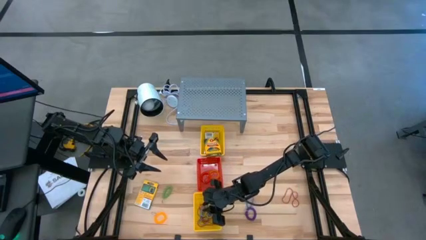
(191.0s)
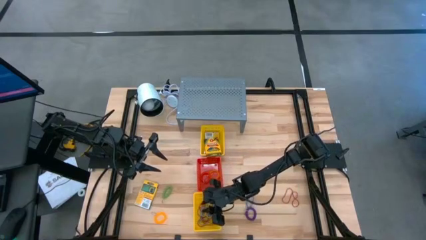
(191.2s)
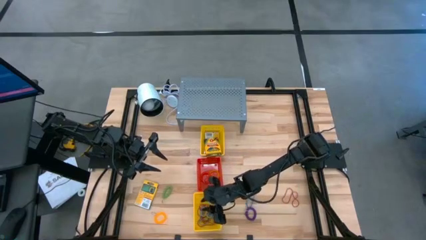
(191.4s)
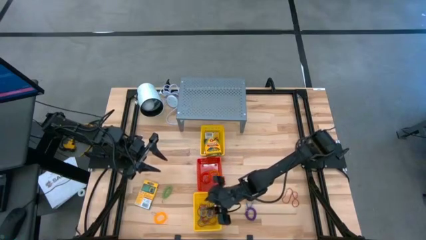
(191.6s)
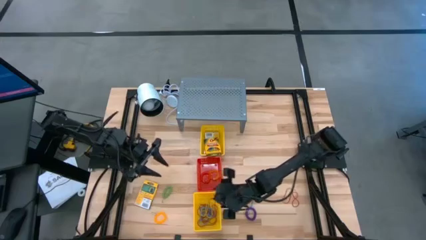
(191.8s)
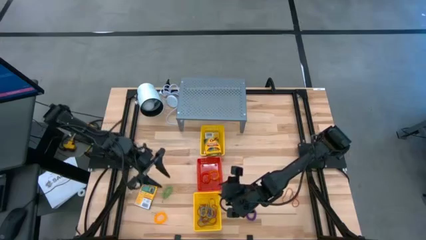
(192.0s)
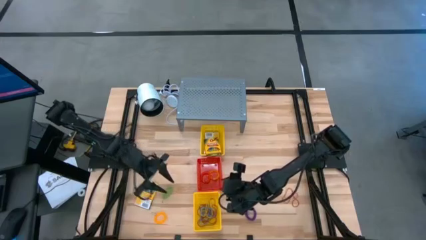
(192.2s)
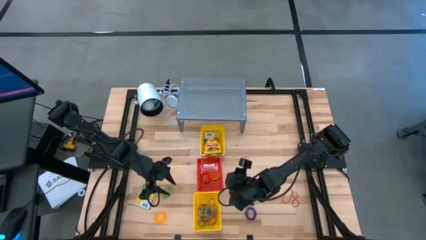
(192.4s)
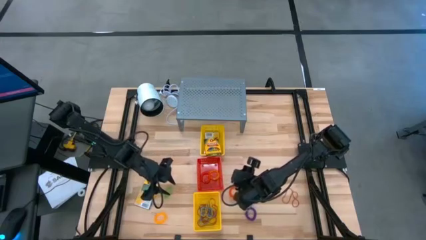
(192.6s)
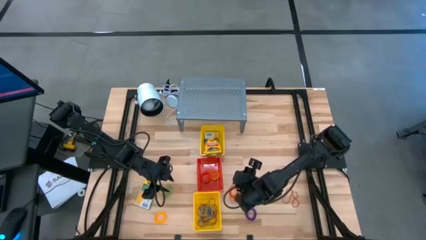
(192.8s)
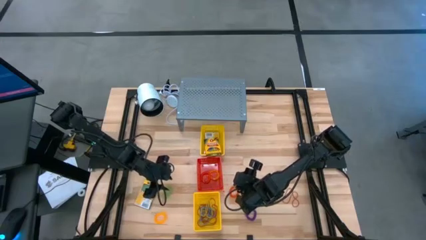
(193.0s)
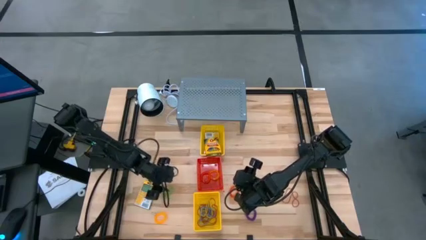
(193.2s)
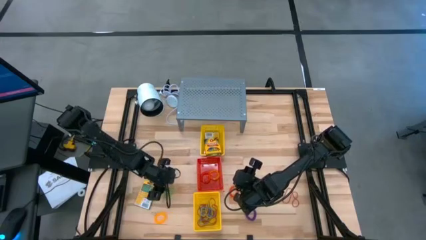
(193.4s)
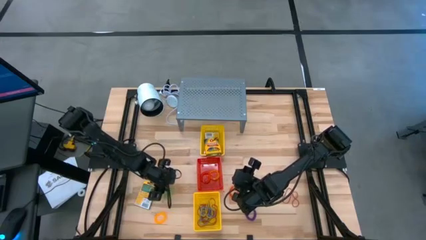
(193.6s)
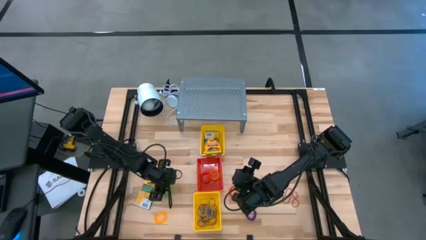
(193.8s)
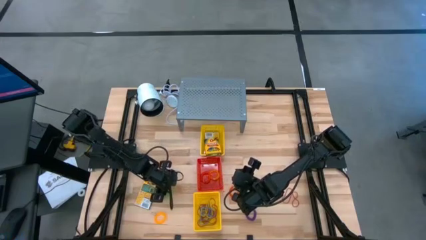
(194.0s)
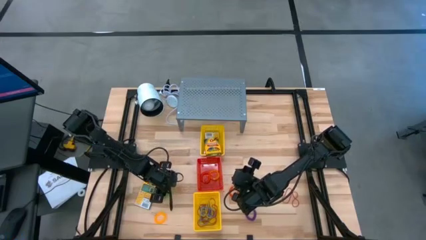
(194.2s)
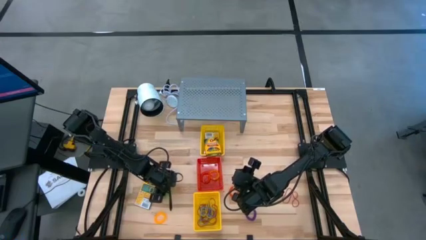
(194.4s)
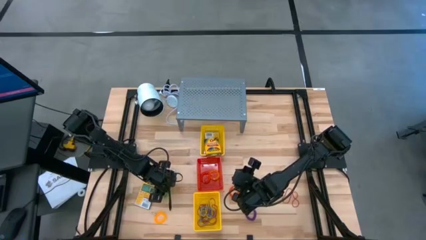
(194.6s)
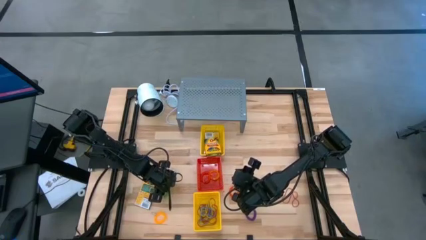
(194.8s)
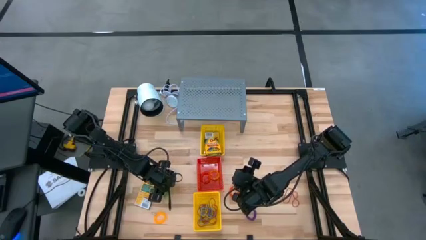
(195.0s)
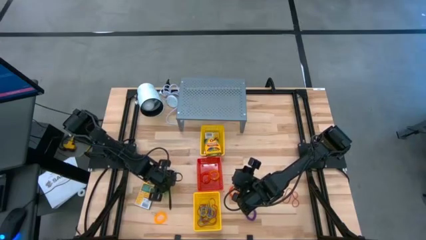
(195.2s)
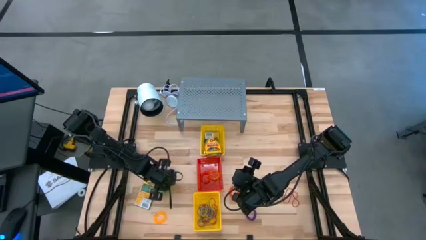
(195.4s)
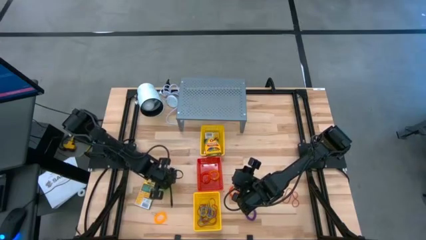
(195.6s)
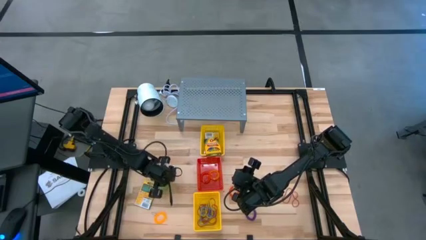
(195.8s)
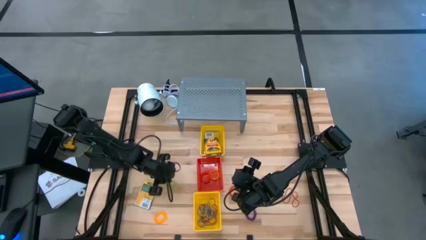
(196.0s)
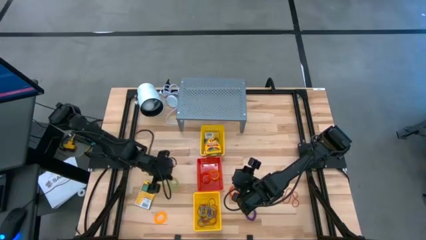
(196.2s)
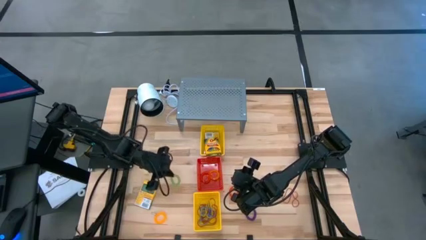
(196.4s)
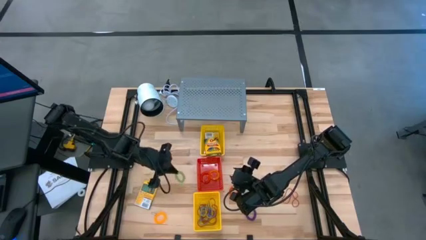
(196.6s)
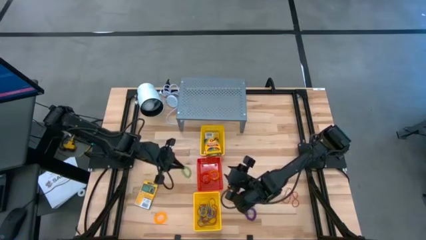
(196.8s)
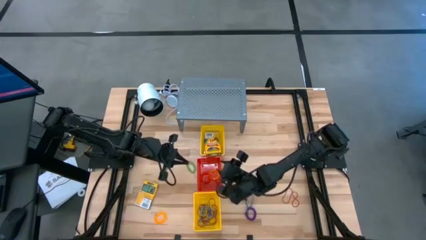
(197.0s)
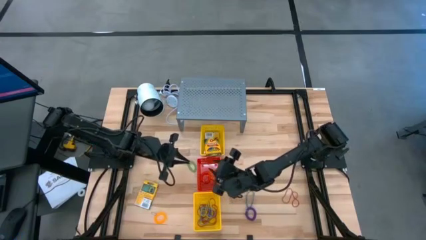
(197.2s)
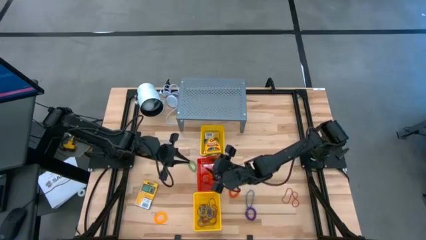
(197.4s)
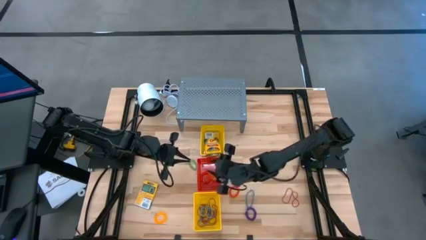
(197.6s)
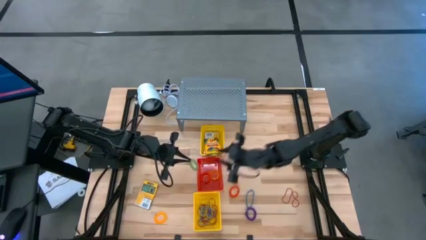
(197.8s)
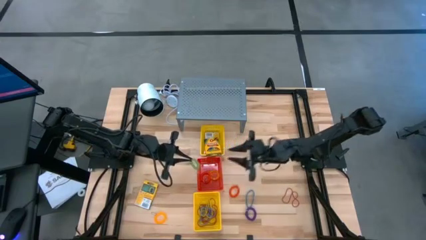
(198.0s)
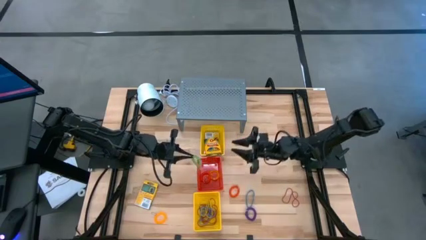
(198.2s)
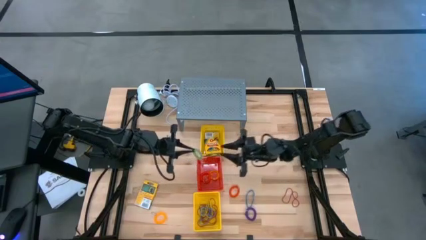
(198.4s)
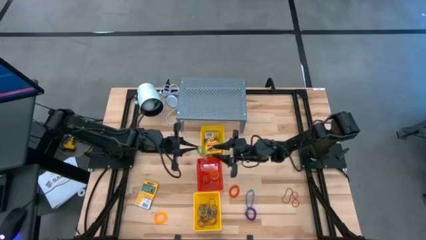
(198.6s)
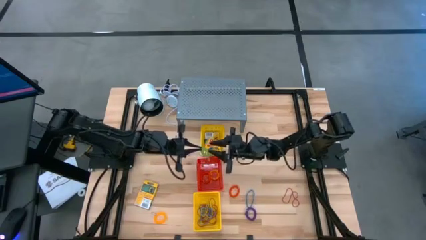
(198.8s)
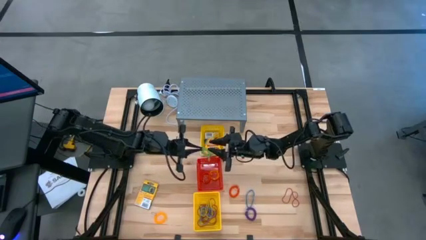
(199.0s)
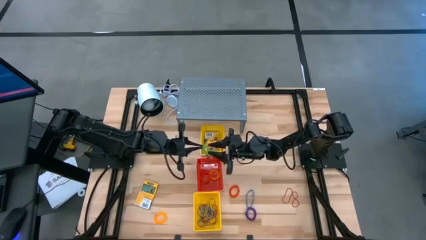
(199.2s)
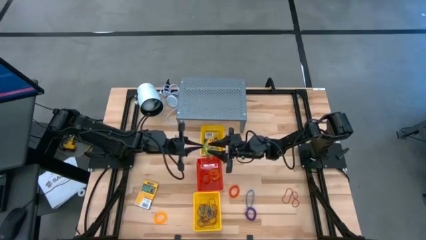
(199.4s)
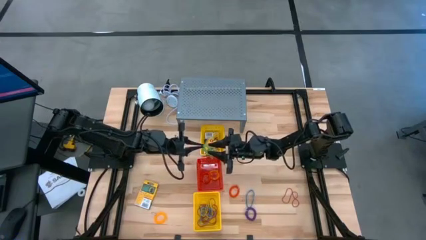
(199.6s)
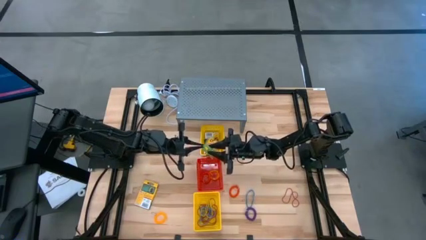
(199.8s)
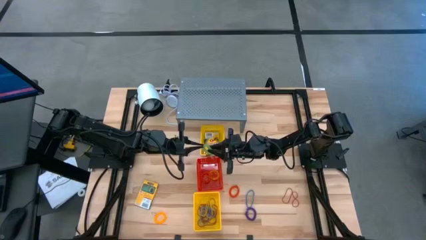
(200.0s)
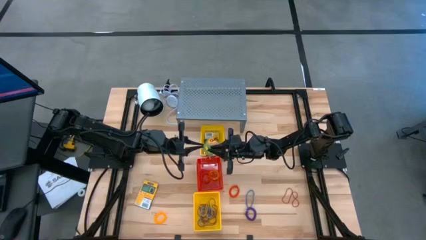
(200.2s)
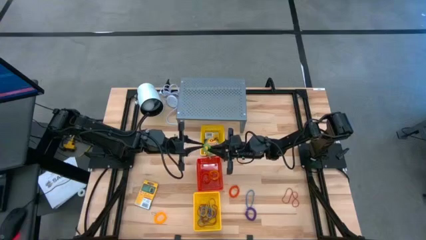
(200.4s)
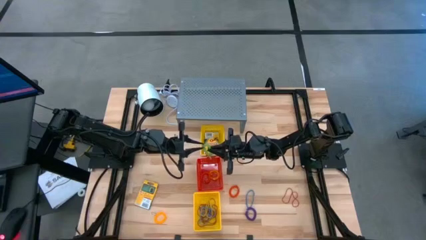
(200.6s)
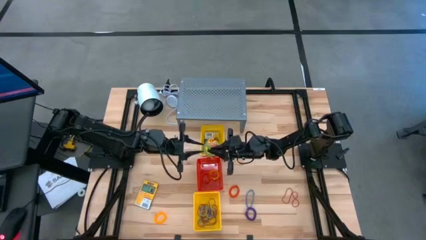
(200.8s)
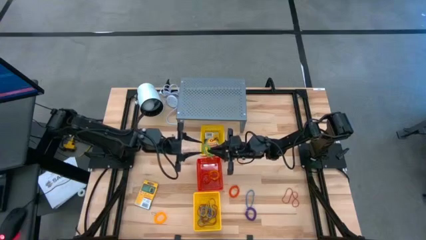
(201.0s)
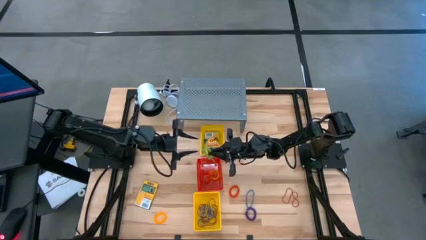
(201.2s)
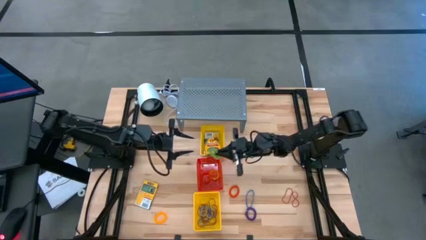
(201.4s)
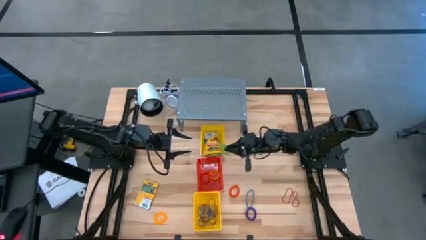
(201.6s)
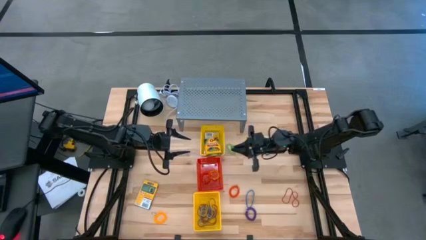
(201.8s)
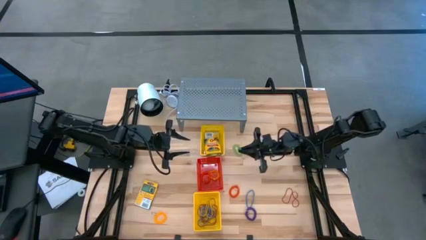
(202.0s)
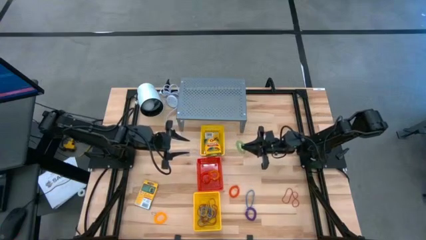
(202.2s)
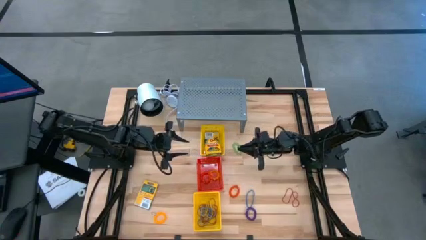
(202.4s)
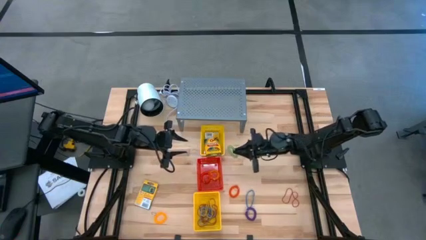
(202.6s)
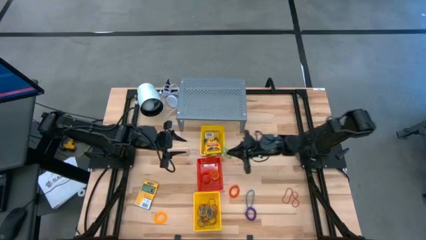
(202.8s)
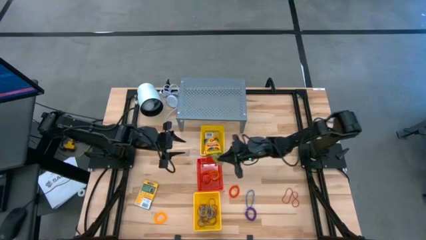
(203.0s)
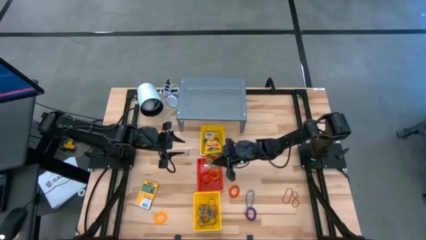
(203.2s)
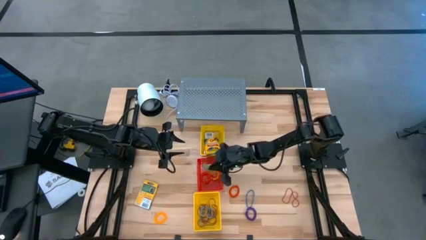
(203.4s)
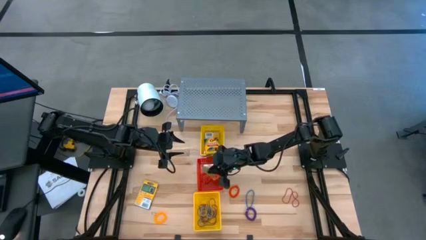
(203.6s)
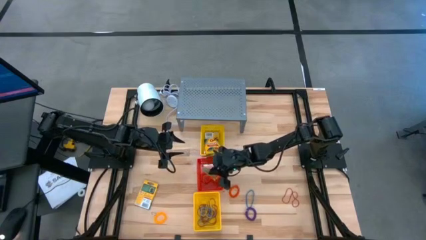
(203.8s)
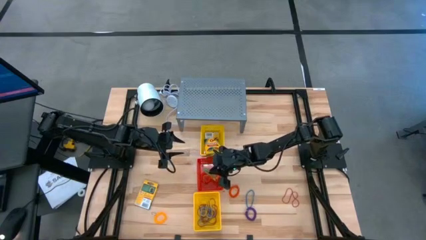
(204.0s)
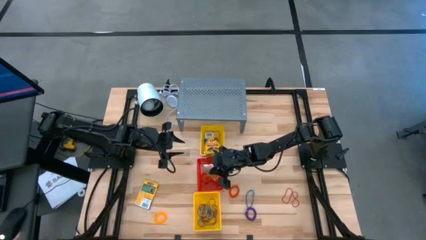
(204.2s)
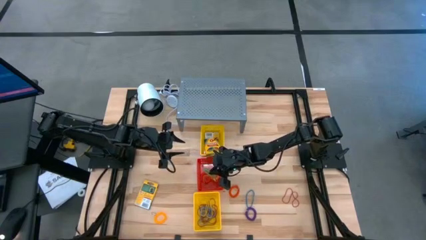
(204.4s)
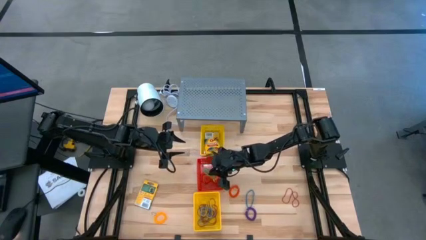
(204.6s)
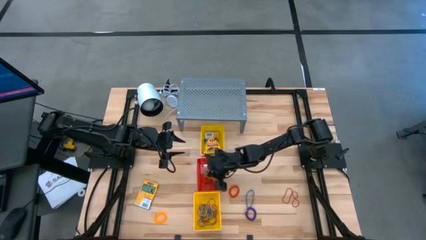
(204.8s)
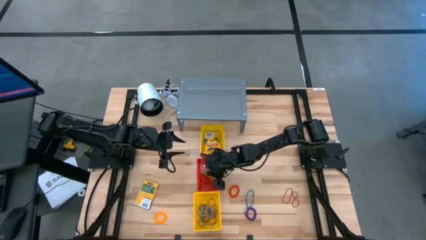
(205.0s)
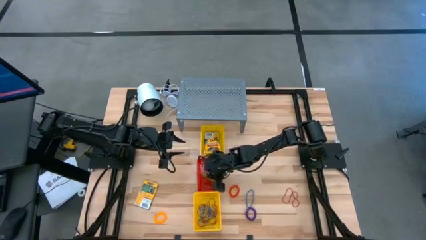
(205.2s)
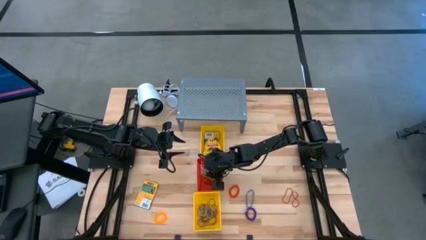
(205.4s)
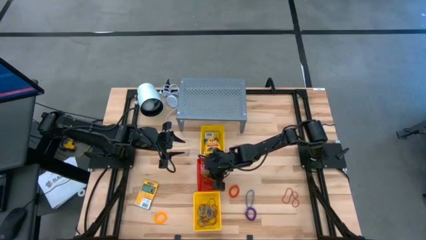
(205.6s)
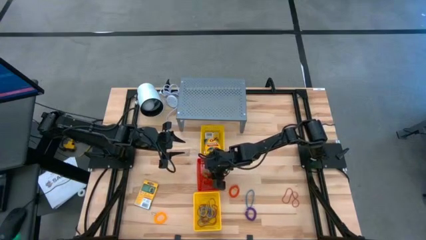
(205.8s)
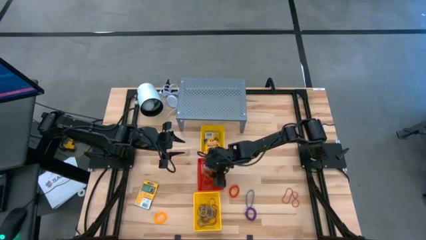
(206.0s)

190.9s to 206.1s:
Task: Pick & Place Office Desk Supplies
Put the green spring rubber band into the red bin

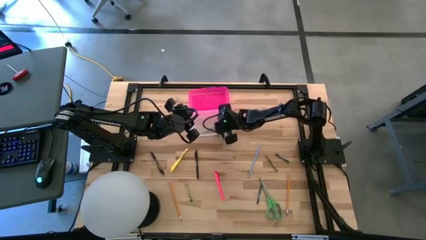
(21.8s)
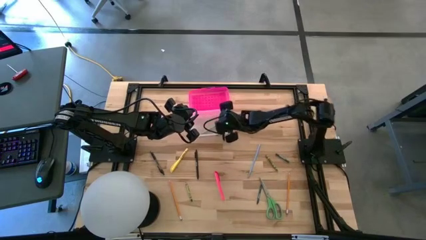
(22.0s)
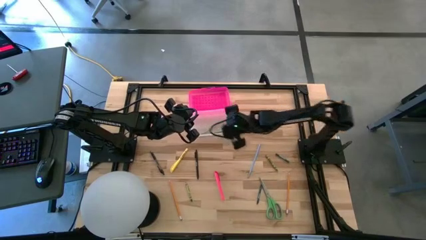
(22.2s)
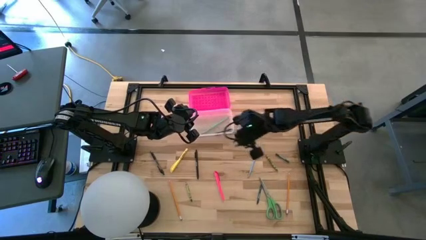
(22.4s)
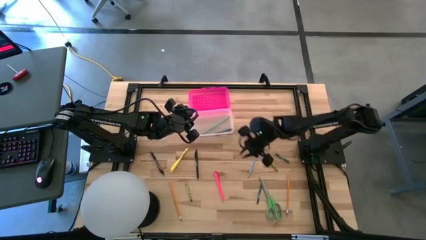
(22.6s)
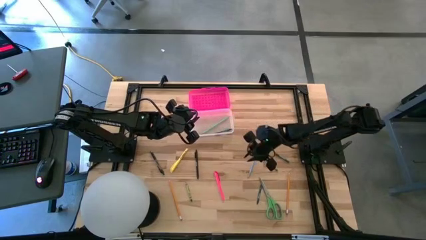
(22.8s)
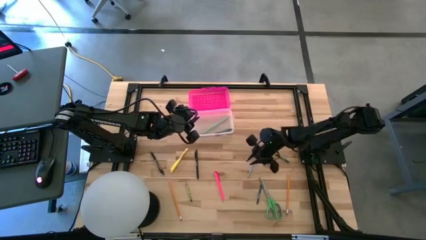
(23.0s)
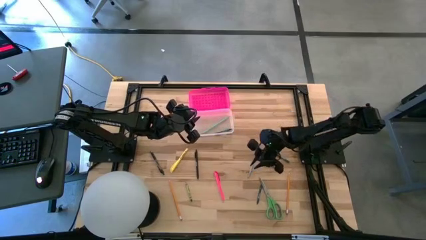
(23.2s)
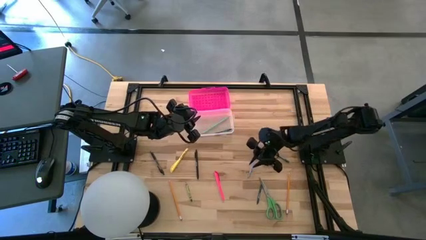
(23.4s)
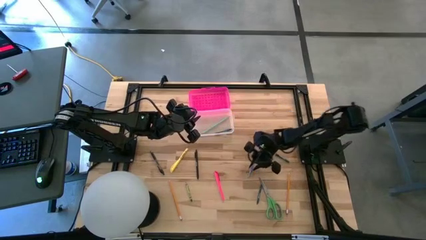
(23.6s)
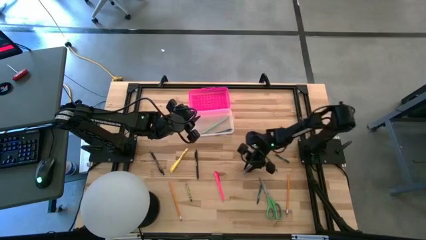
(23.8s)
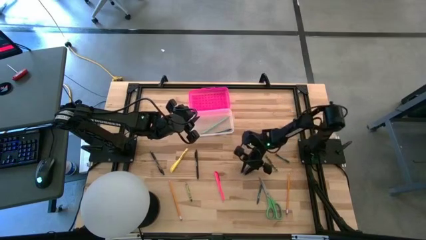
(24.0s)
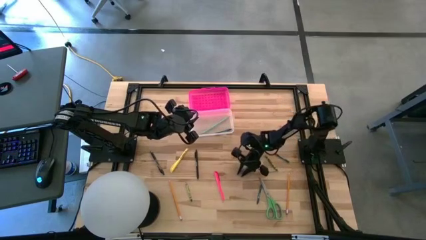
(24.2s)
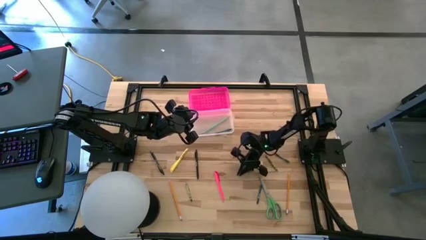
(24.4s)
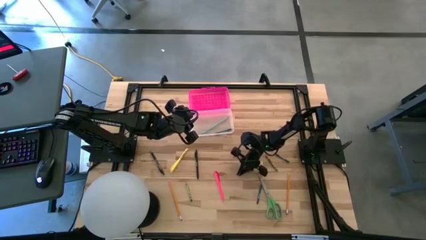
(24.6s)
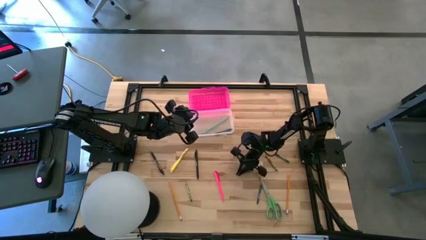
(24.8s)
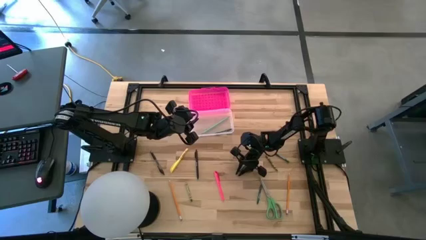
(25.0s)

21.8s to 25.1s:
Task: Pick & place school supplies into a supply box
Put the blue pencil into the pink supply box
